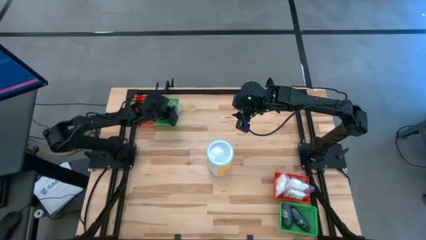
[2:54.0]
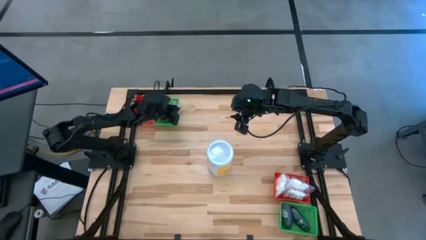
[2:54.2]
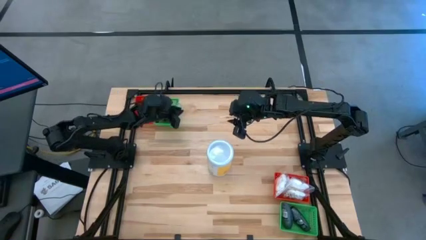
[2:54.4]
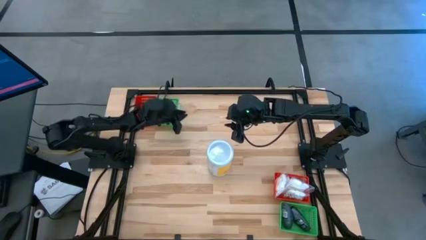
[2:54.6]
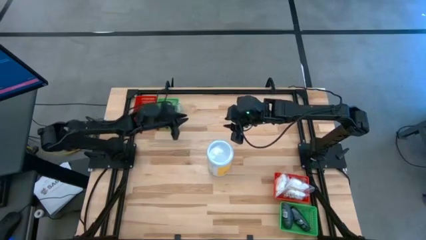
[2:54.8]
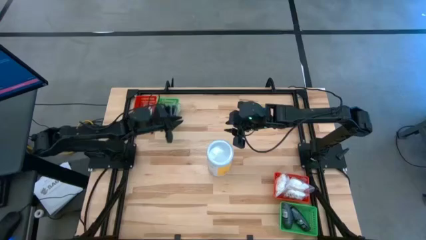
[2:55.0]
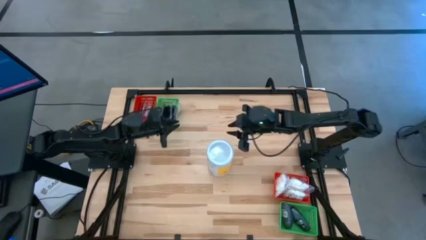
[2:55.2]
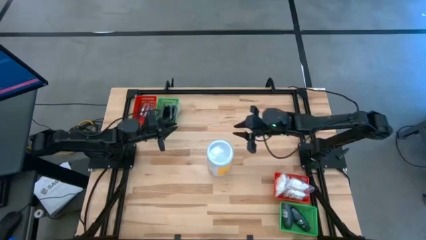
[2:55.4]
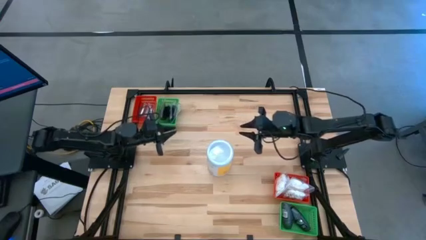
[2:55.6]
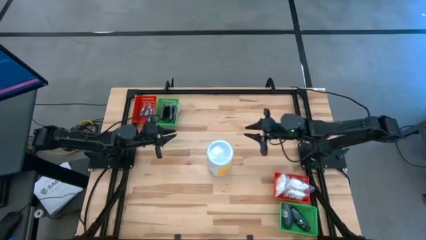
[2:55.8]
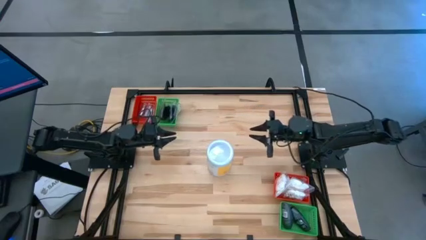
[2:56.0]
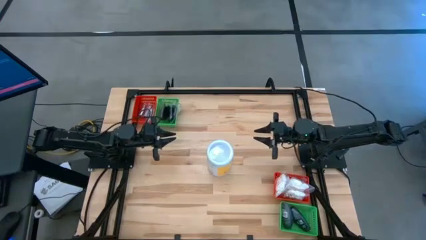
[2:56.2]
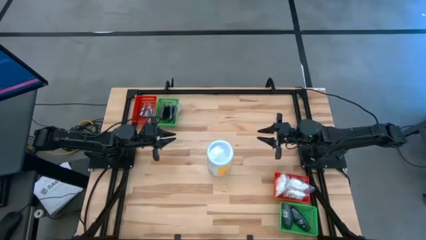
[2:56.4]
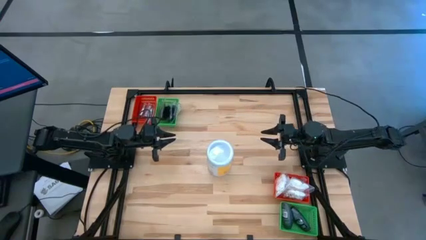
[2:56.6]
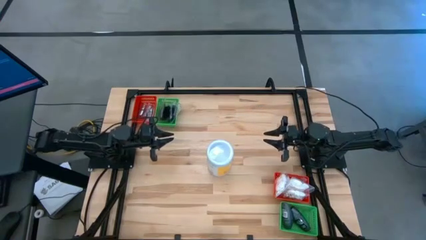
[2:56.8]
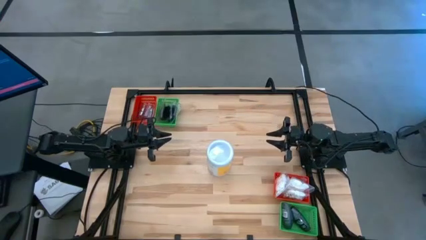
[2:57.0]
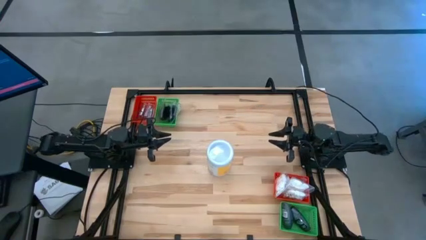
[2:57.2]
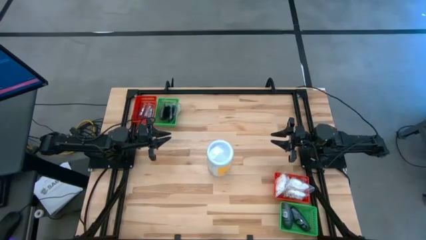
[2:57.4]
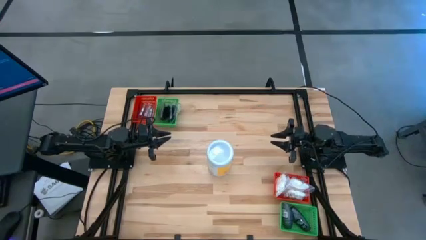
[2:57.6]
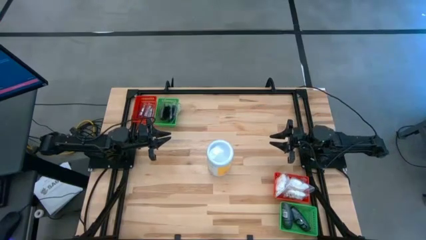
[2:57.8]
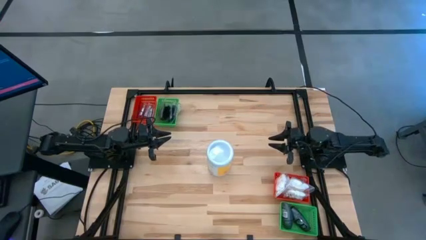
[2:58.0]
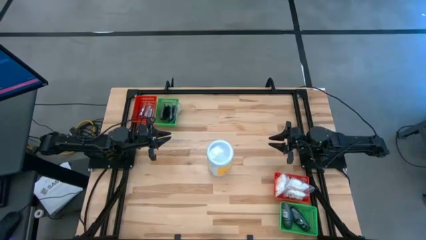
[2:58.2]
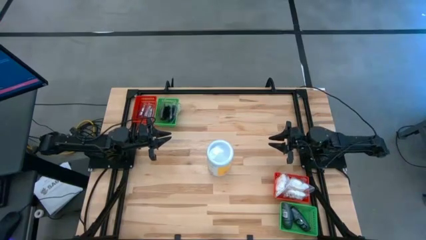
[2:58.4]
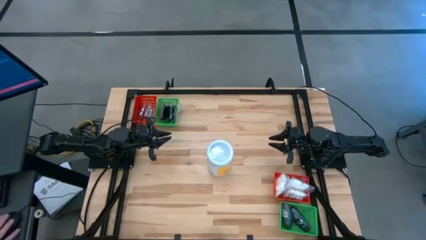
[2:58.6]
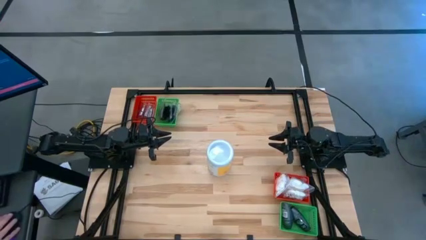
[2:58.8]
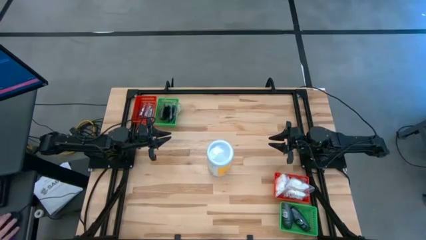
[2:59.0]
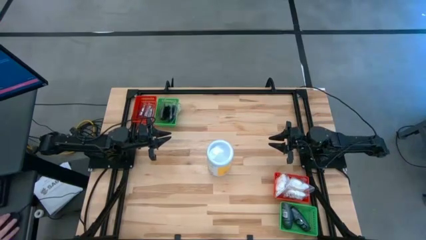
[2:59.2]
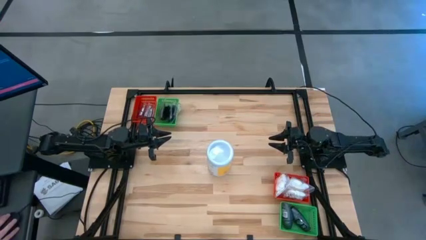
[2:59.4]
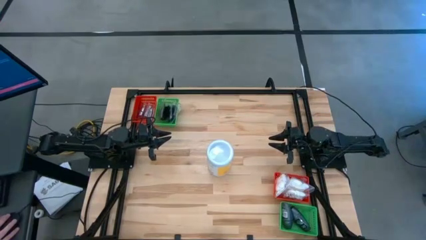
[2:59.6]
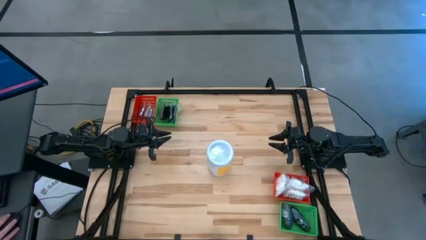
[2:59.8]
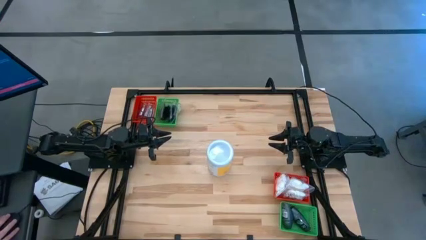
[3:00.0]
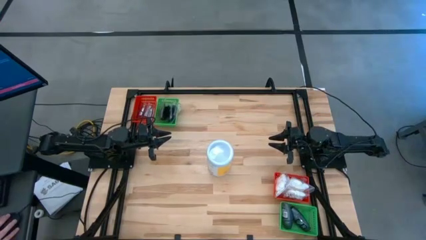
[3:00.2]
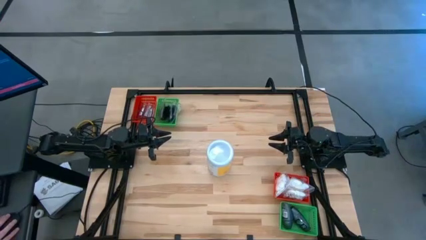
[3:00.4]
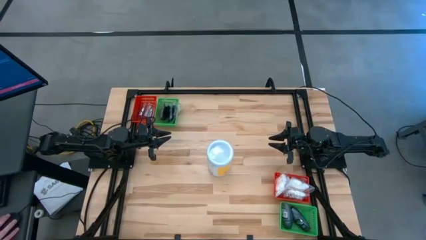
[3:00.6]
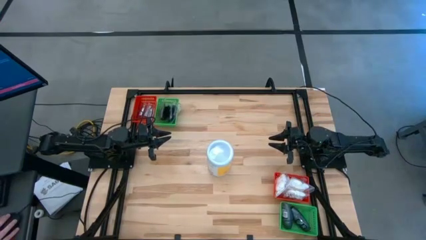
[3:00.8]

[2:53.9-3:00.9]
Task: Pick & Place Travel size toiletries
Return to Home Position

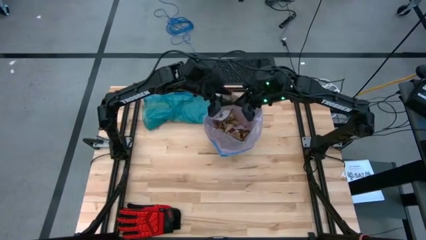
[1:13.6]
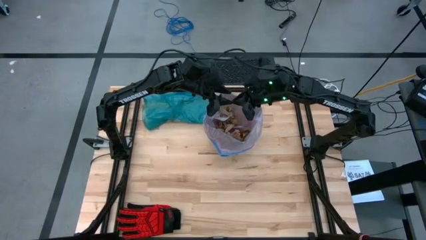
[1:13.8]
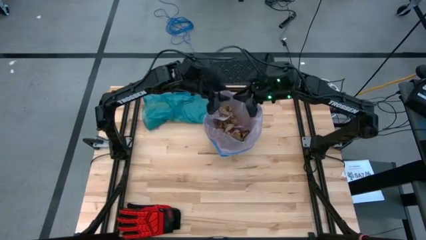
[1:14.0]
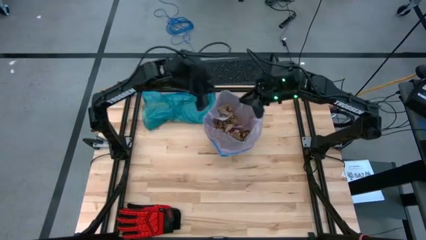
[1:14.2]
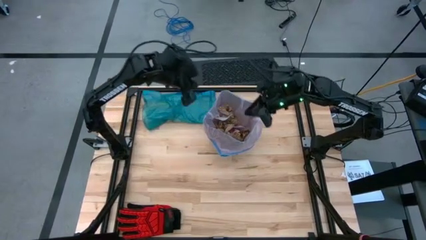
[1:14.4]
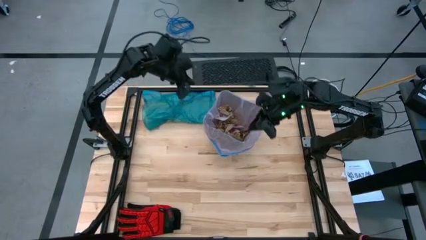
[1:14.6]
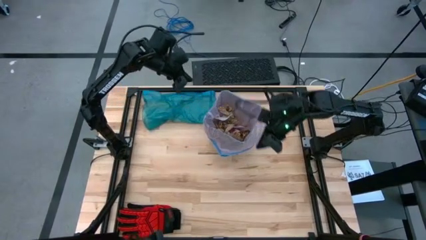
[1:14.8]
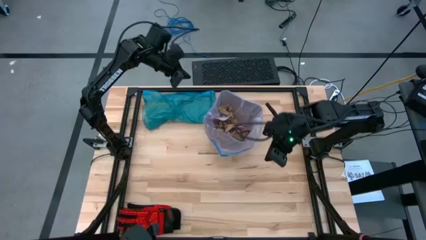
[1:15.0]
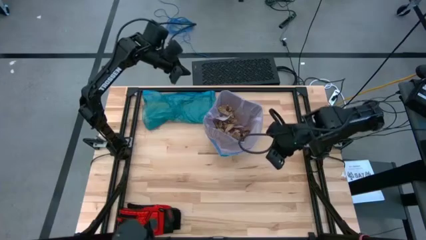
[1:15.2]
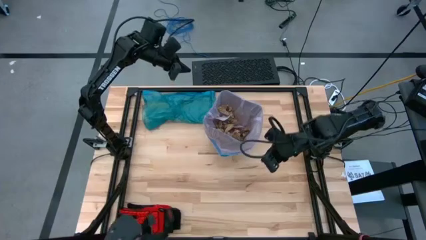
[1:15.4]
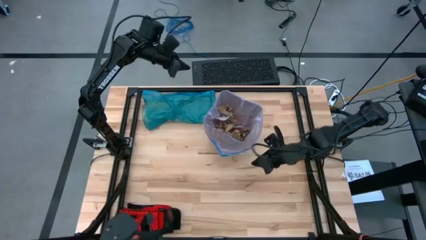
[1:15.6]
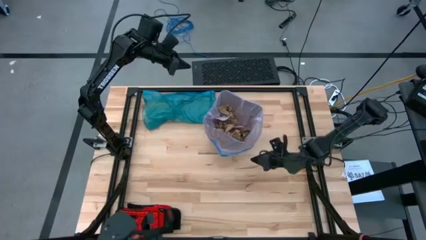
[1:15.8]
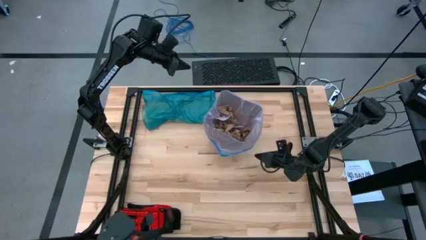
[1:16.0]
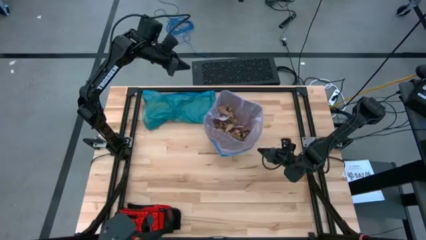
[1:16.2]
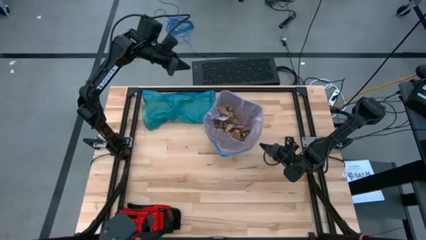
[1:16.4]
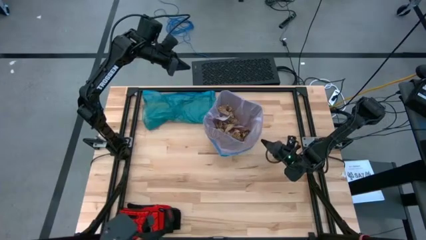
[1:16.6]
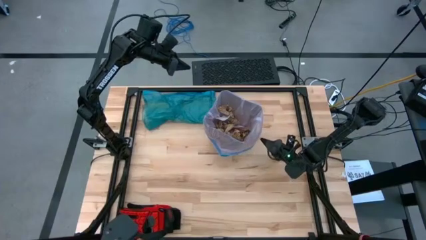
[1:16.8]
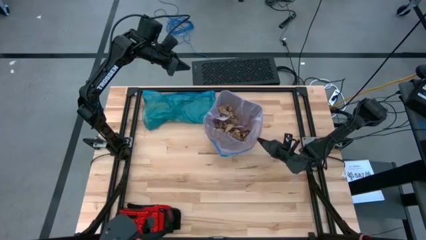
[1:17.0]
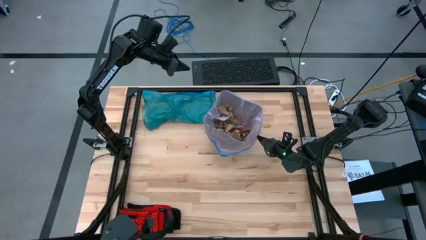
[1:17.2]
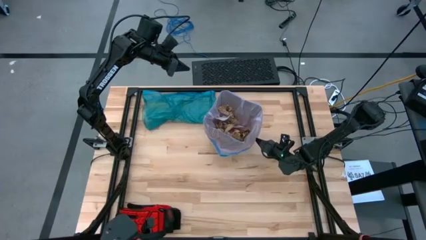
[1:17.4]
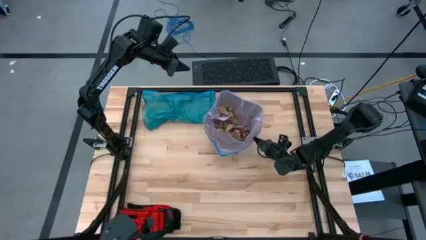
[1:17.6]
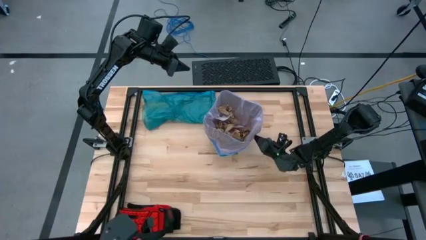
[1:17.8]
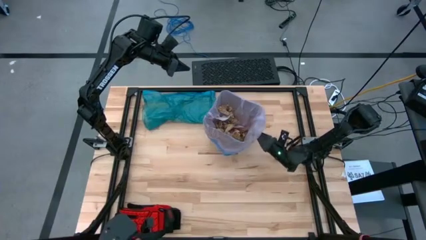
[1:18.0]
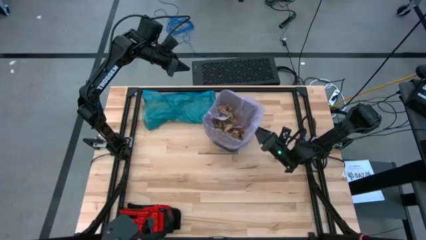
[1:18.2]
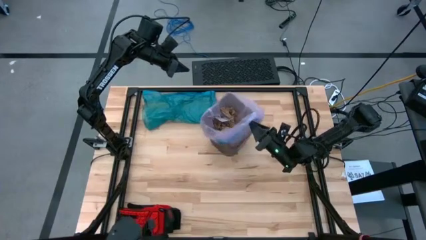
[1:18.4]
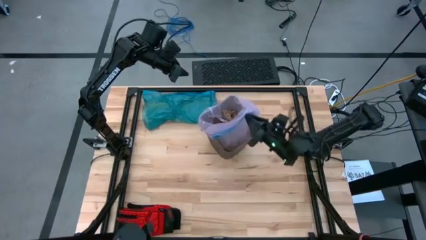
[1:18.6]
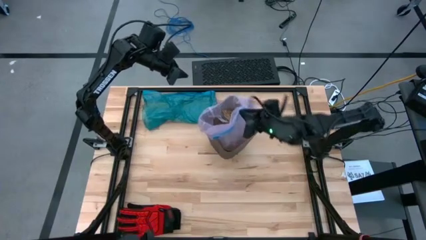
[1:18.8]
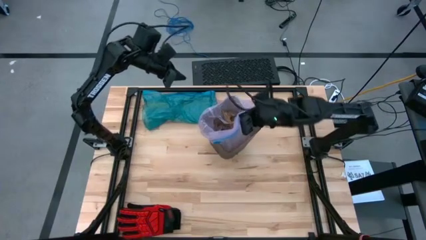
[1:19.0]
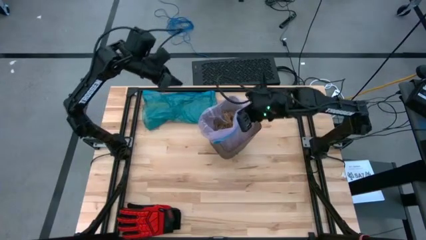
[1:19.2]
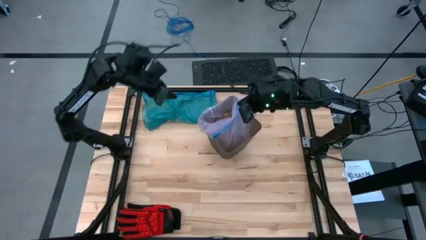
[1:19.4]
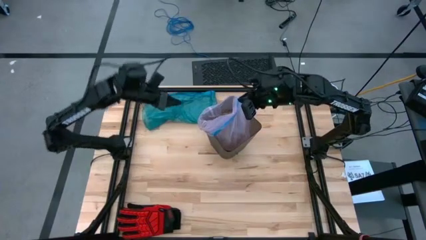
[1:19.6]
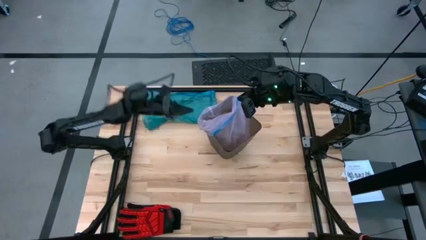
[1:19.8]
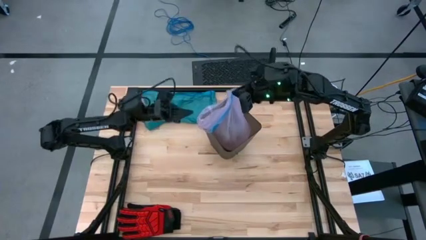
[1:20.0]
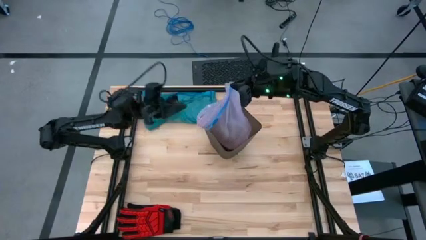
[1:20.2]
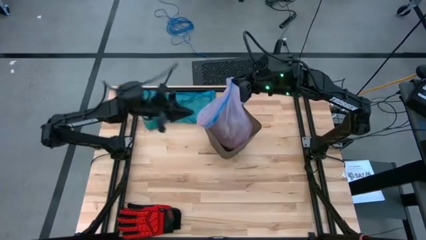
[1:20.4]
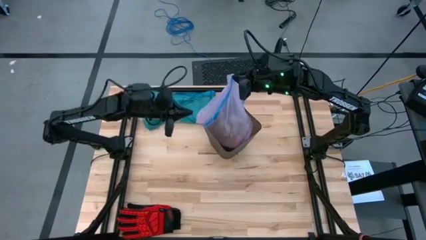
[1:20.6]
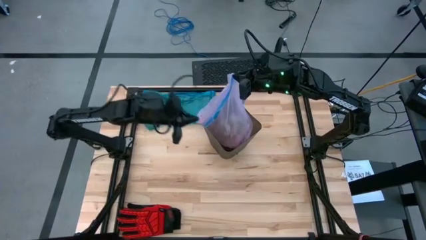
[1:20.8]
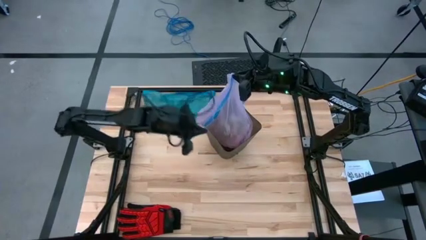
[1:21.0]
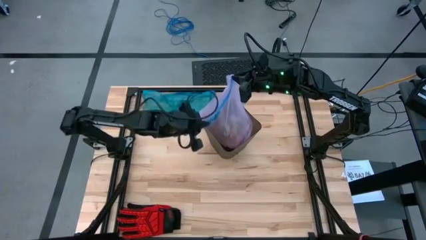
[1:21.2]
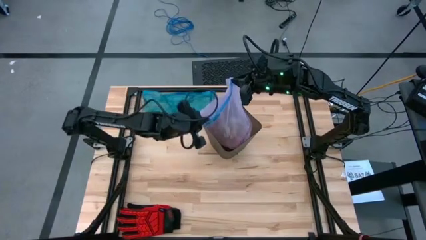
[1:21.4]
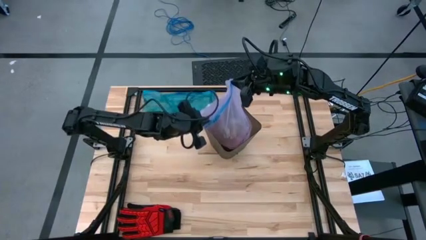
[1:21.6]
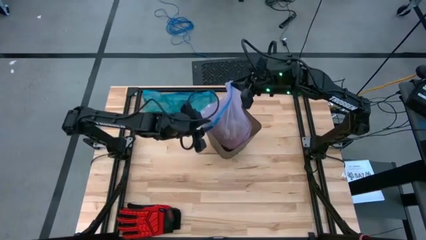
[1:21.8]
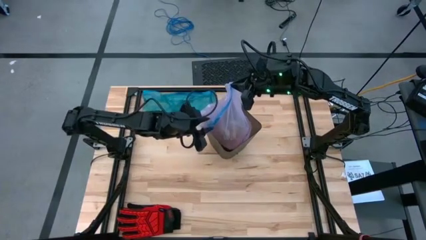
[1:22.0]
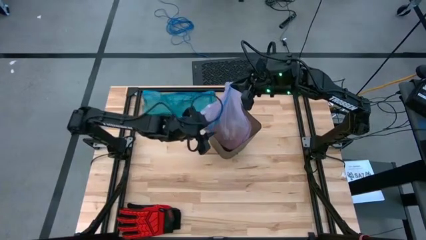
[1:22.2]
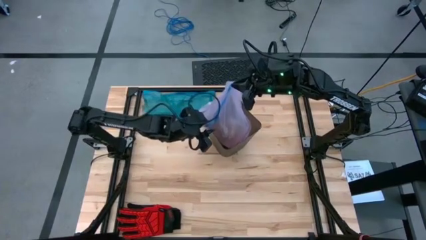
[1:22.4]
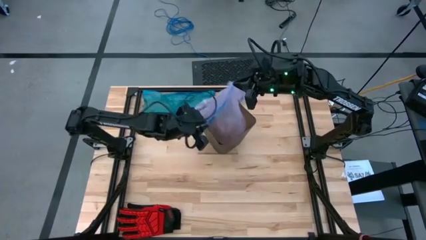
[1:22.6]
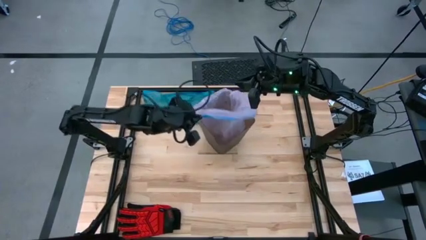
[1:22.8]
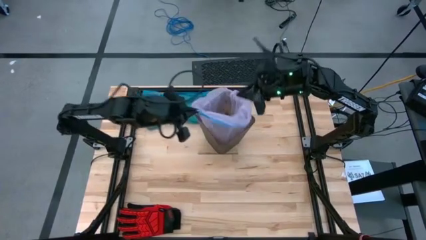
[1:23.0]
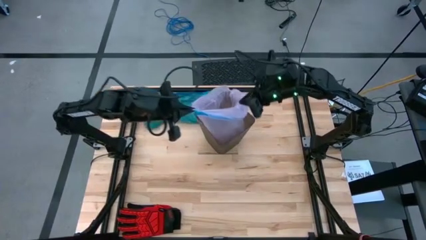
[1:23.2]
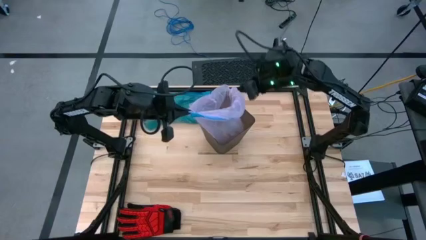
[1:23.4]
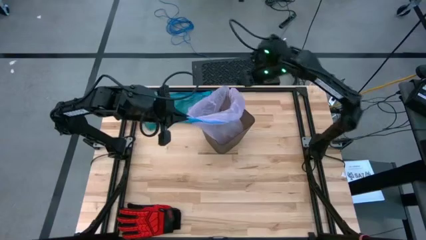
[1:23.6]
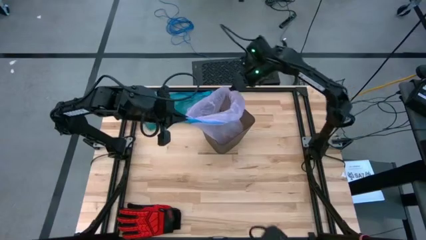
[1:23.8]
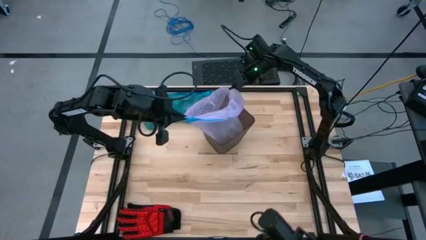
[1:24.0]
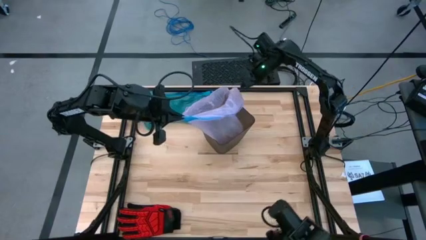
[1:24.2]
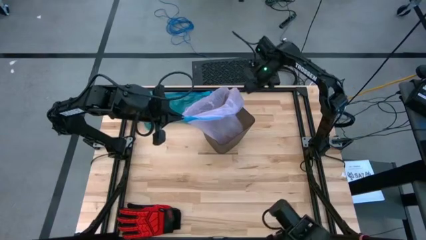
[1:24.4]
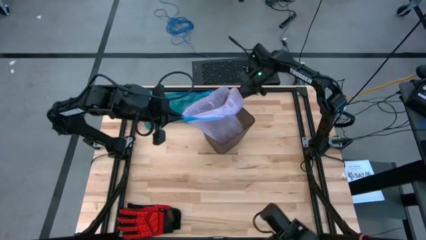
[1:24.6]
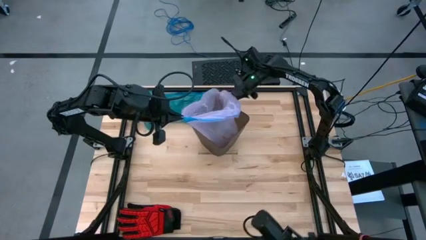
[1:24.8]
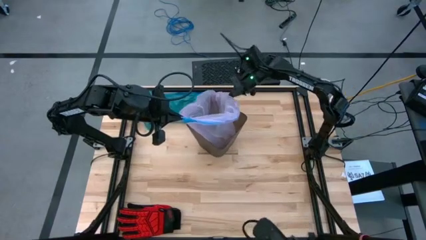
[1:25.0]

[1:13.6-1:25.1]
Task: place trash/remove bag and relplace
Remove the pink trash bag from the trash bin
